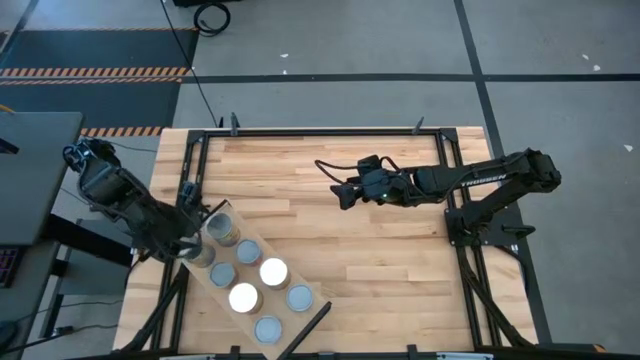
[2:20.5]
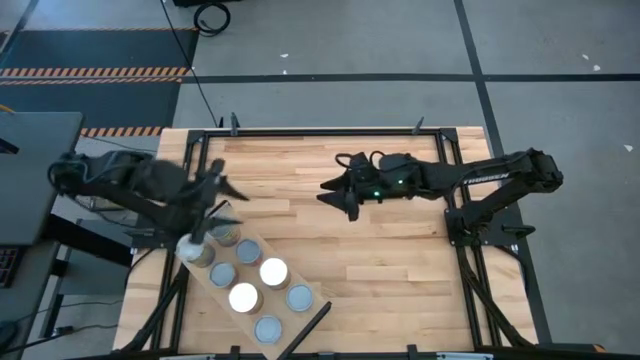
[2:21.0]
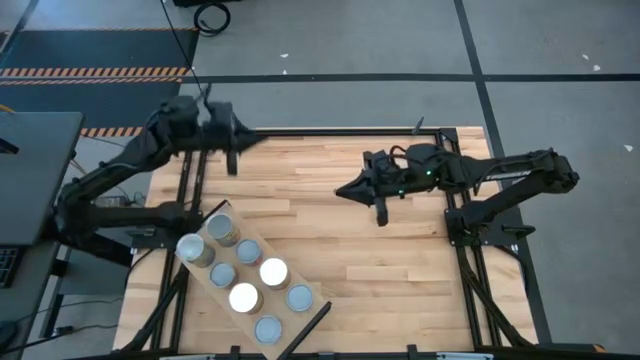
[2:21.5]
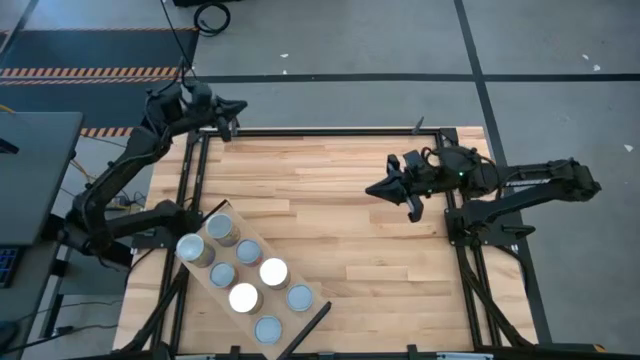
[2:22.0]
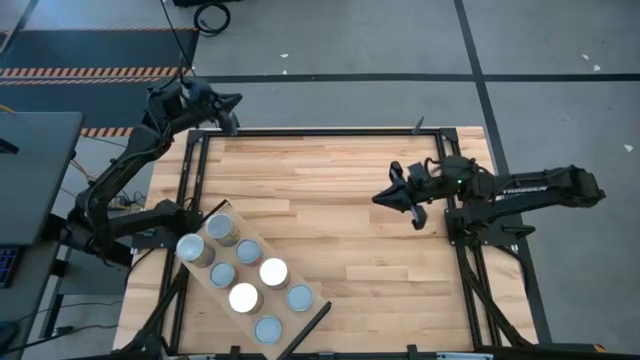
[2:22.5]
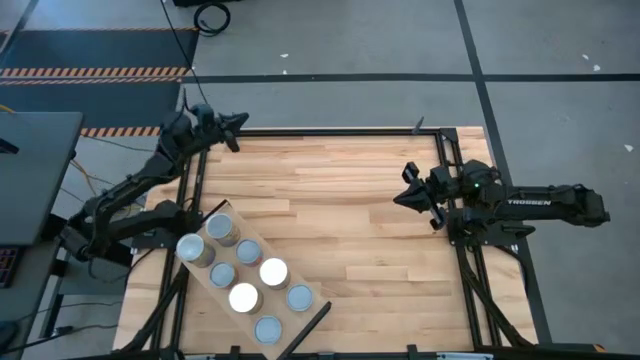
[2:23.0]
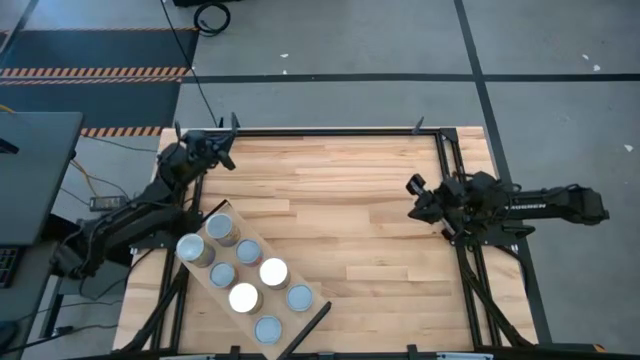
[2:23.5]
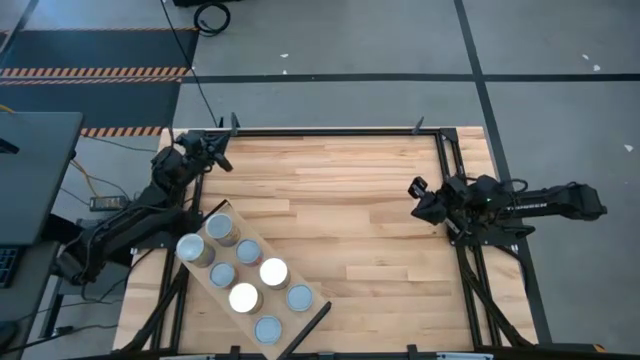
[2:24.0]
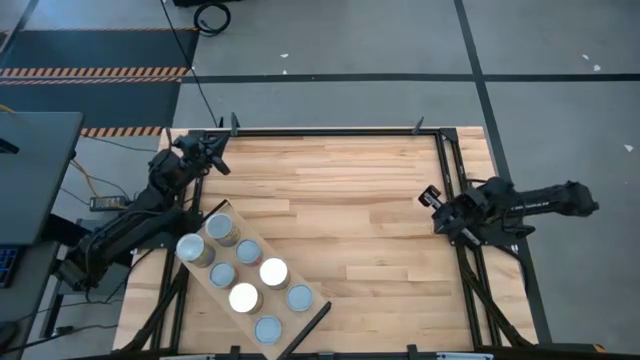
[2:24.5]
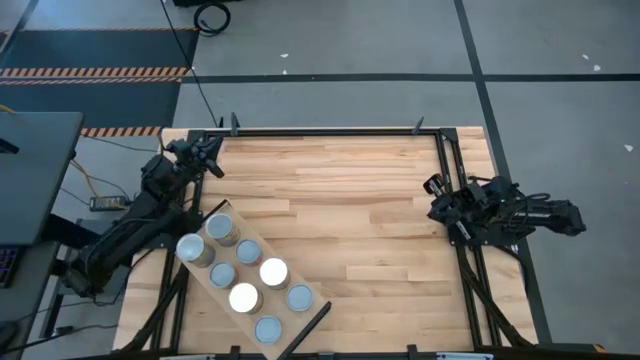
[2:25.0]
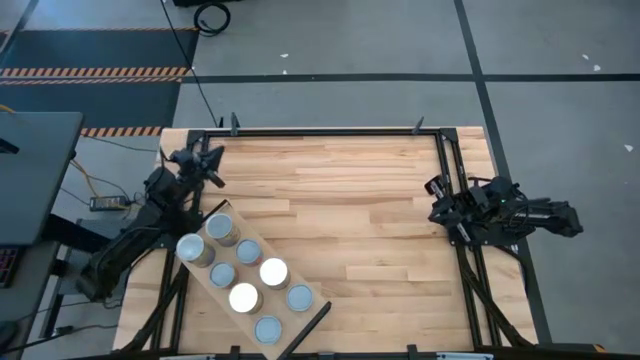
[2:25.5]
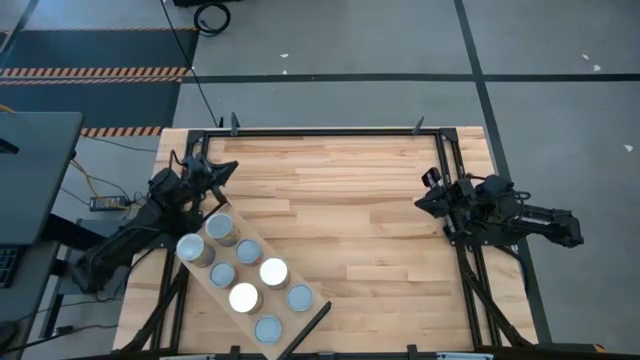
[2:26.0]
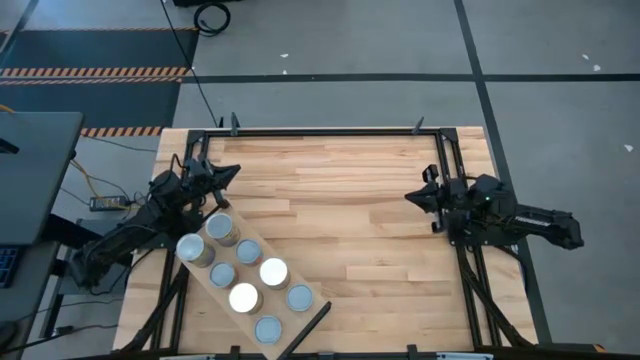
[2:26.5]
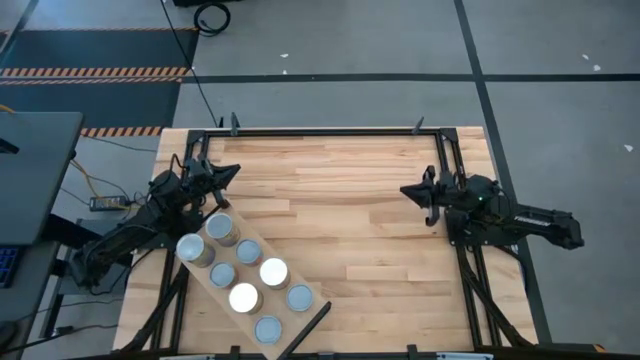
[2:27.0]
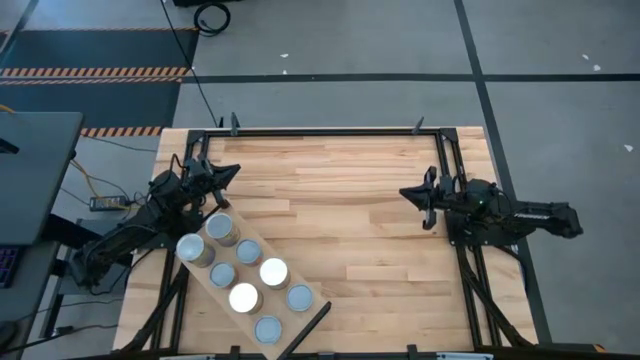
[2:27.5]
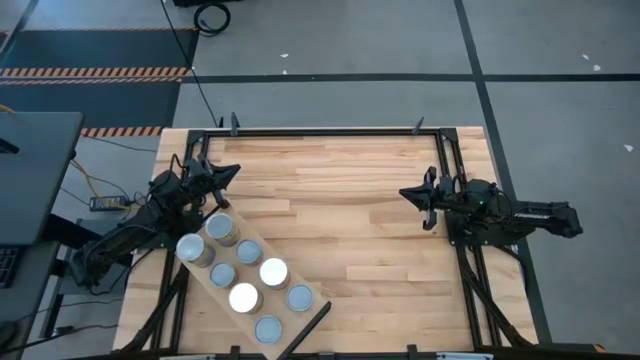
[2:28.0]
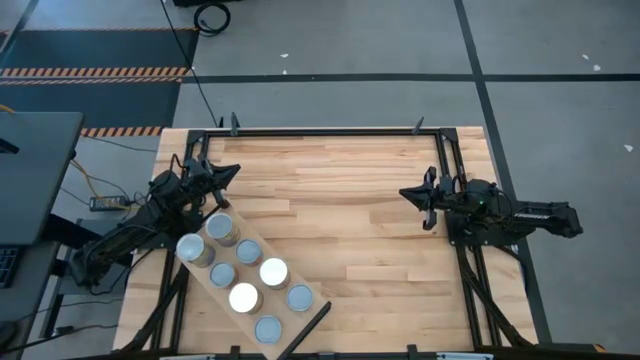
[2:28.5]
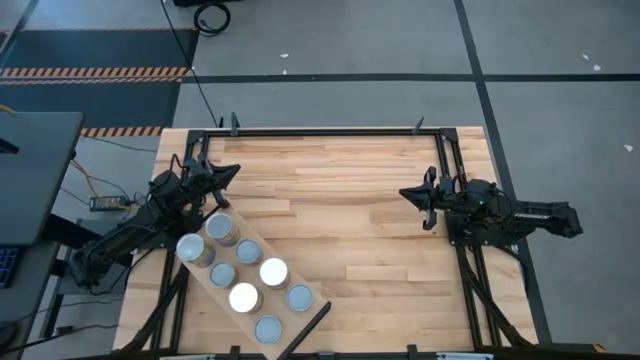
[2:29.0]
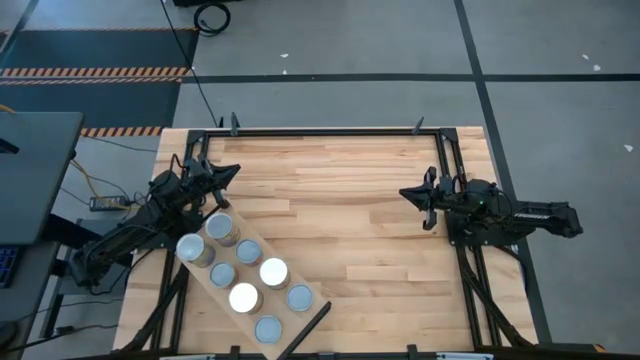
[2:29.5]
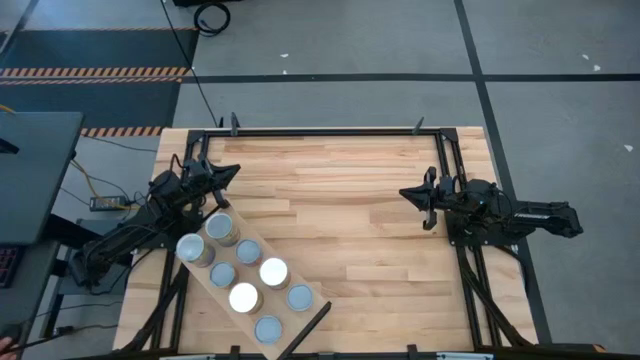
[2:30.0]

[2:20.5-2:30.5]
Task: Pick and place cans onto a shelf
Return to Home Position

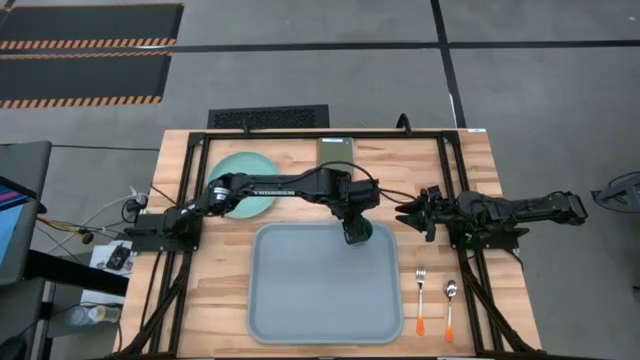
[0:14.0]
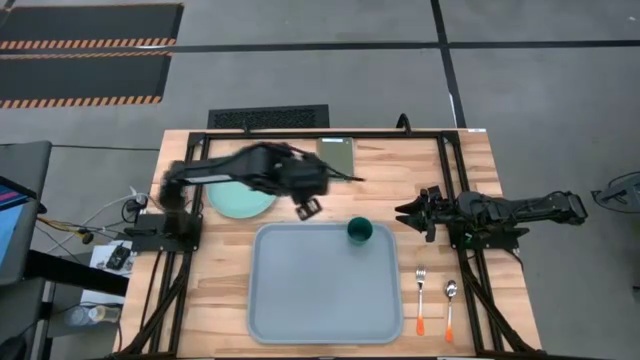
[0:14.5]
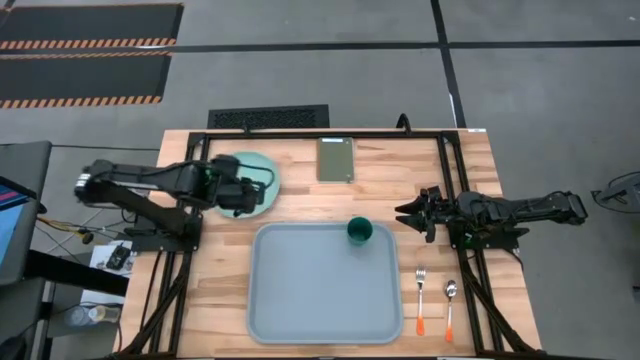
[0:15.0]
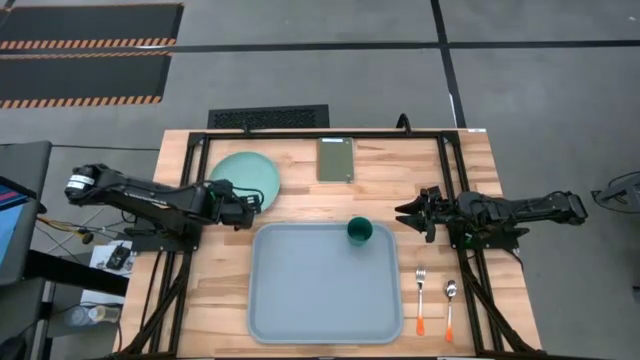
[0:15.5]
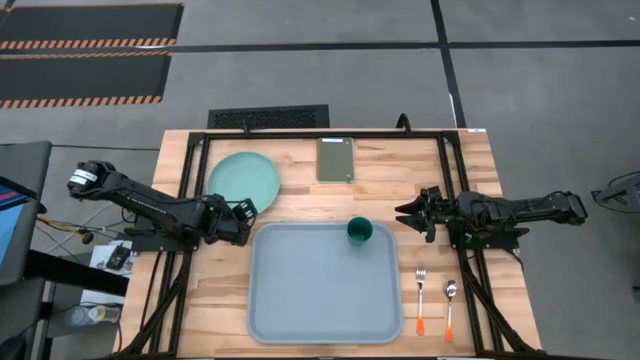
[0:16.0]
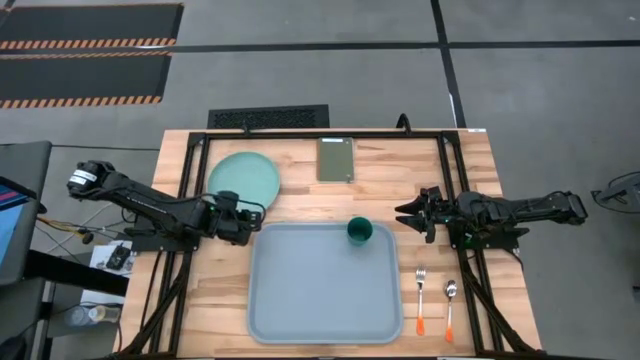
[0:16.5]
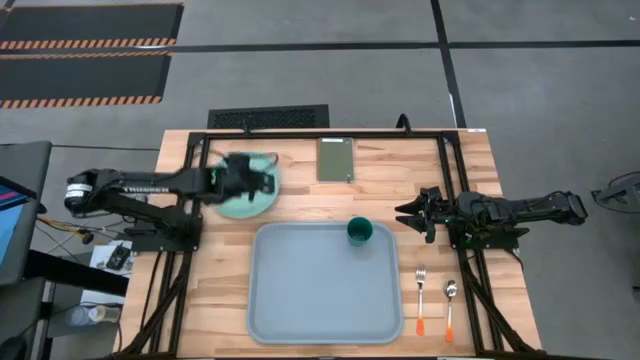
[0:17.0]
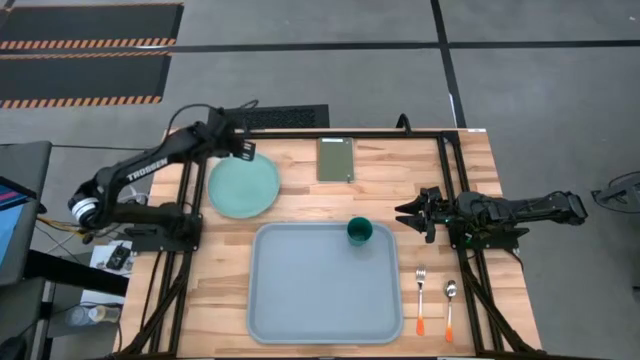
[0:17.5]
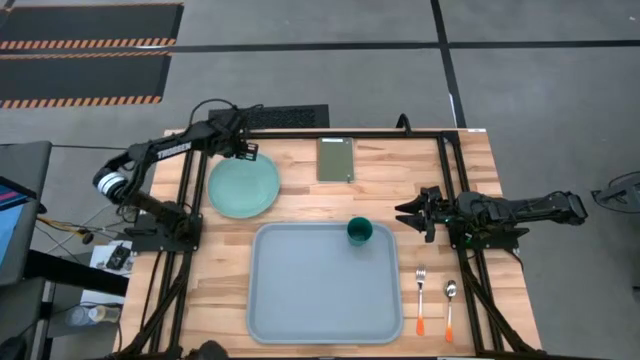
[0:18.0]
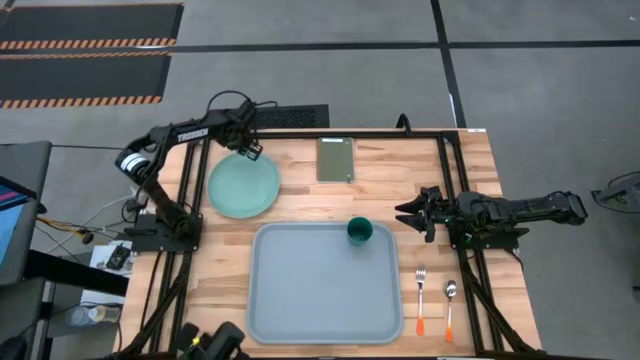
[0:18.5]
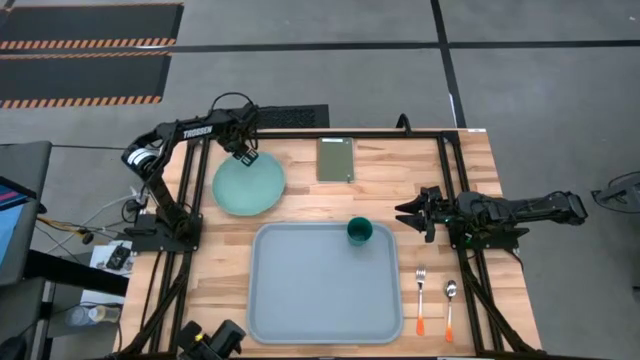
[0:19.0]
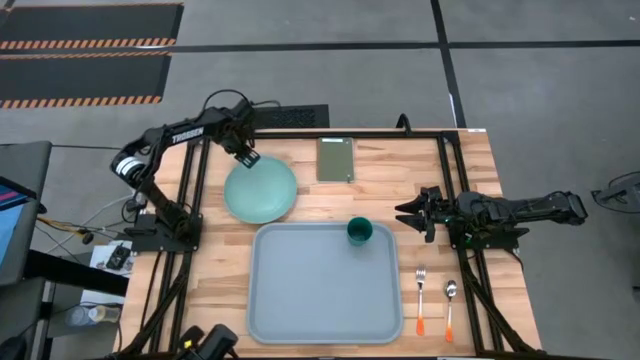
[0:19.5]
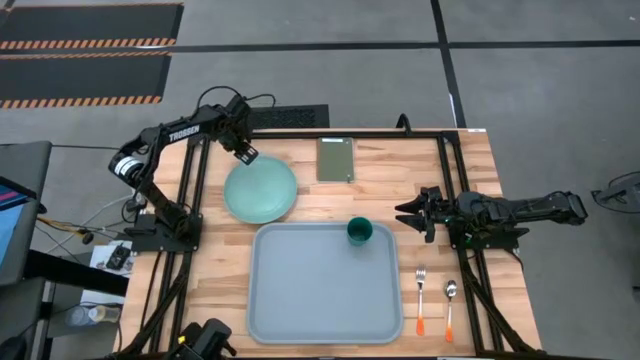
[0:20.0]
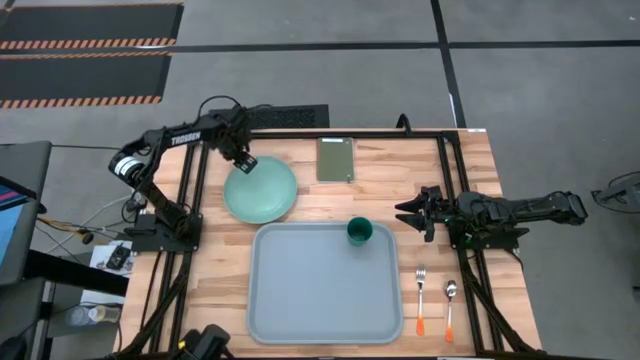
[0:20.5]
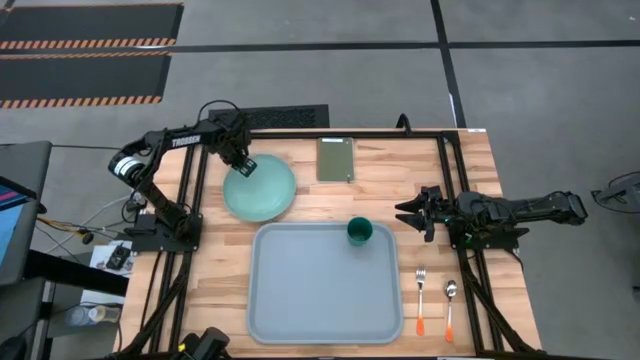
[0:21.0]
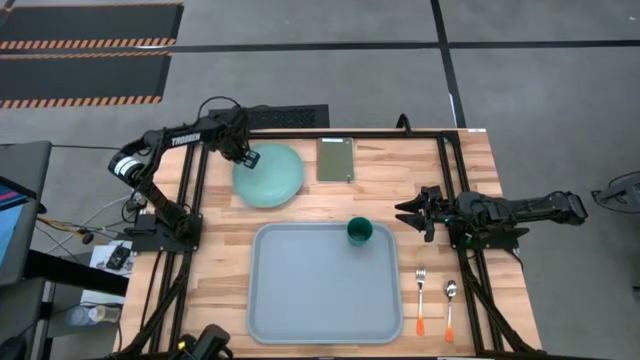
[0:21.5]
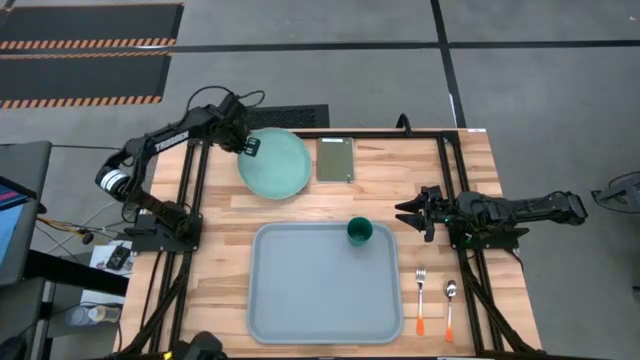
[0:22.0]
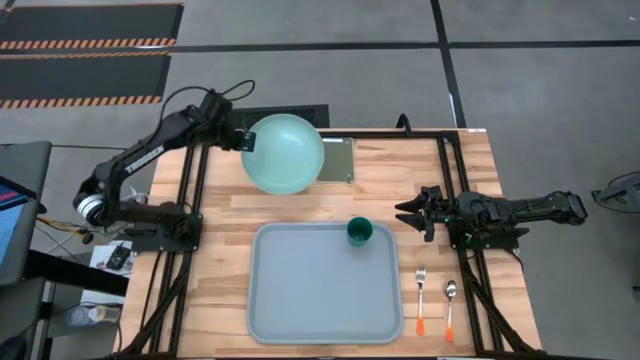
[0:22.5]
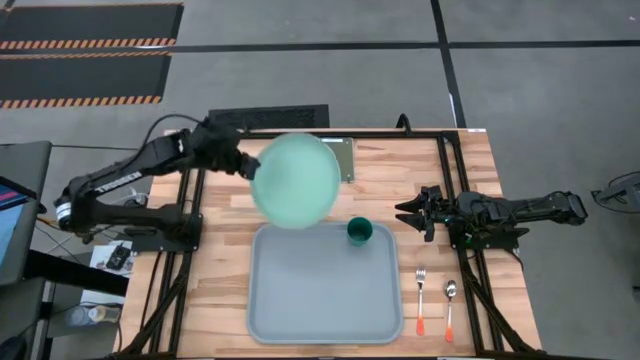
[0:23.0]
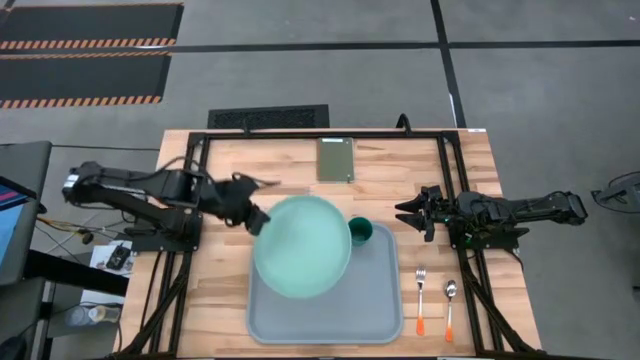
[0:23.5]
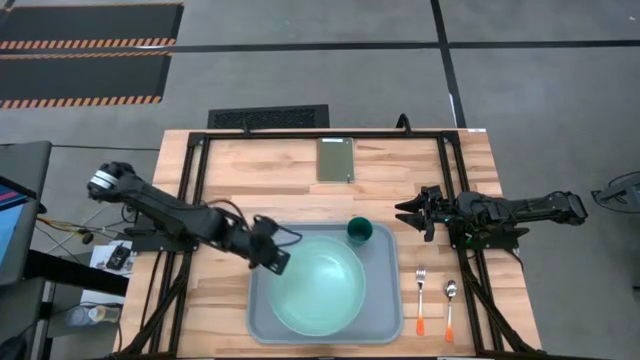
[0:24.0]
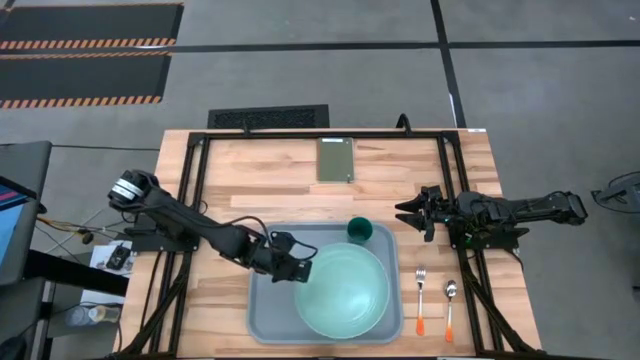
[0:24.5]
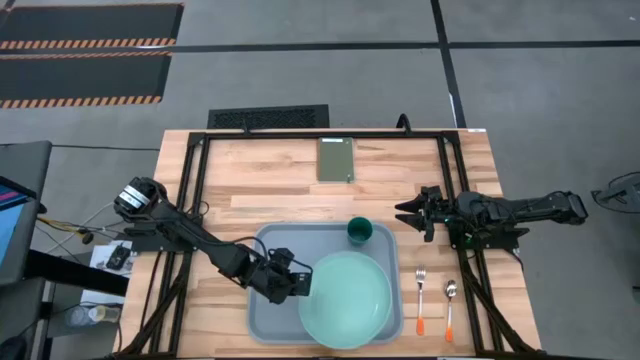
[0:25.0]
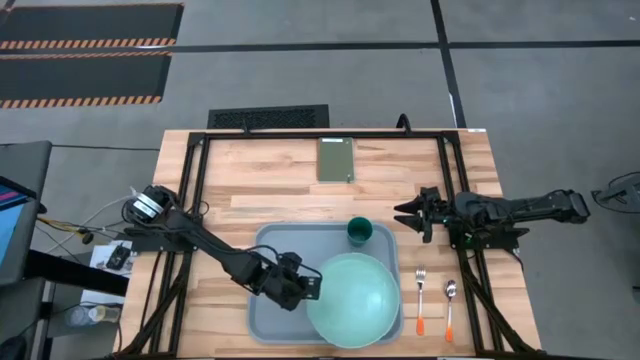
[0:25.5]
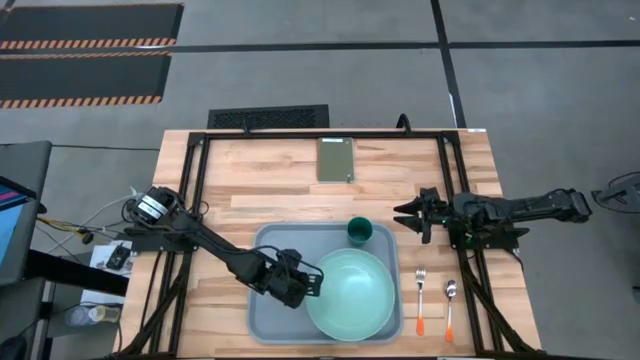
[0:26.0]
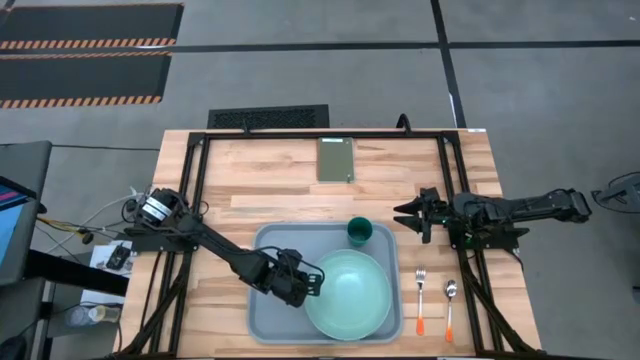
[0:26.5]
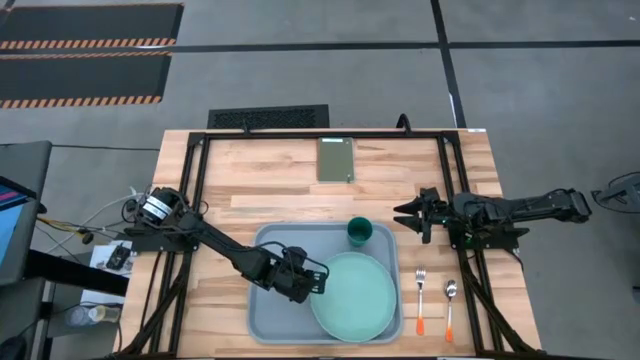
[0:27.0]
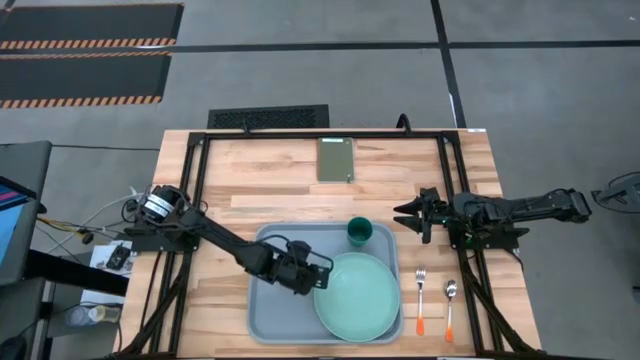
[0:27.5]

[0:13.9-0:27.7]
Task: Pick and place plate/cup/fork/spoon on tray
Put the blue plate on the blue tray below the blue cup
